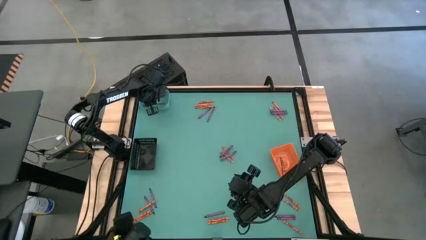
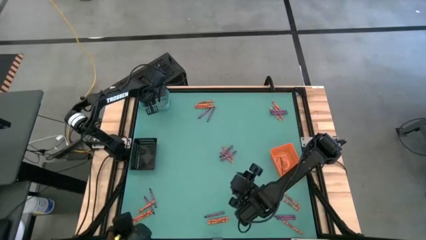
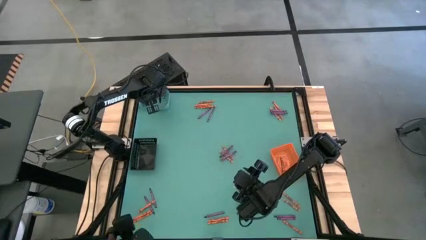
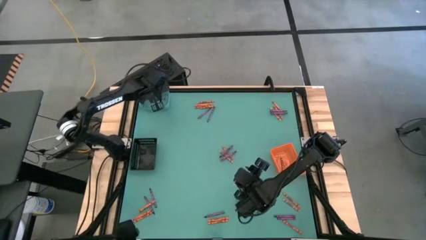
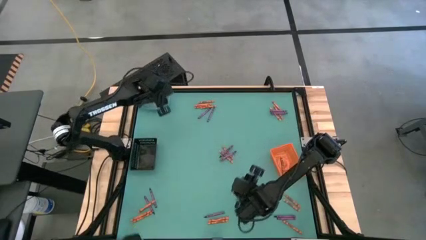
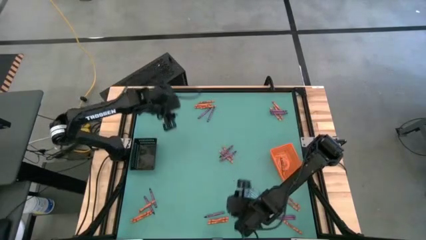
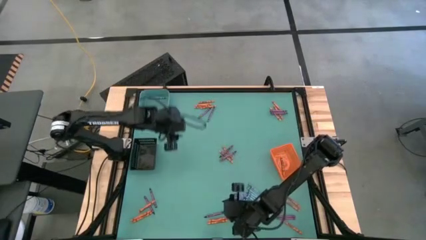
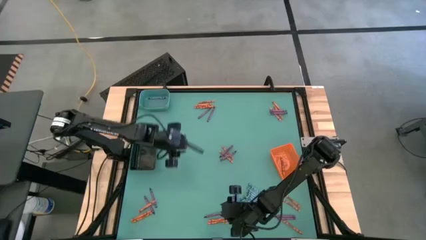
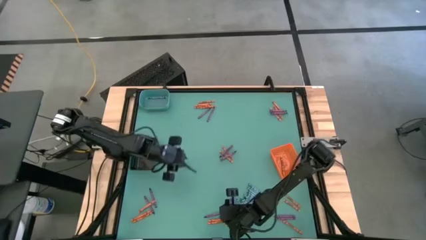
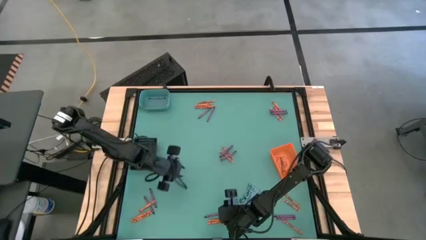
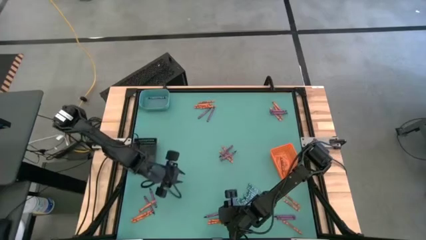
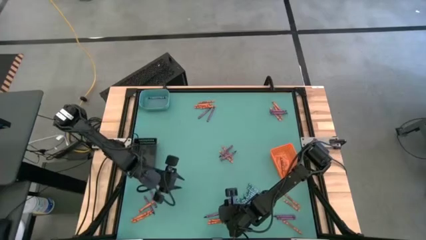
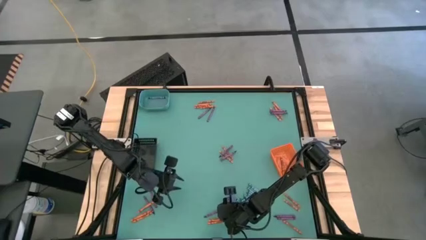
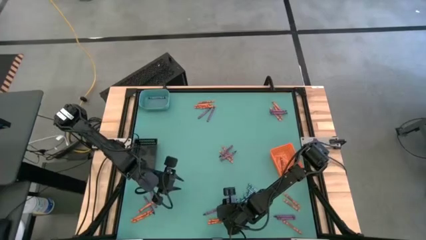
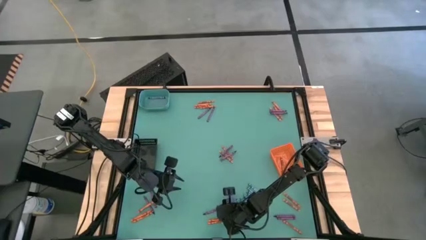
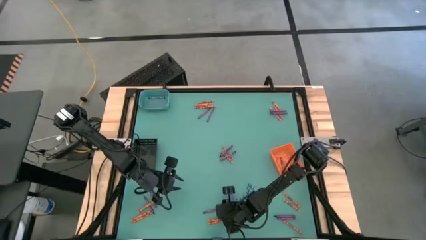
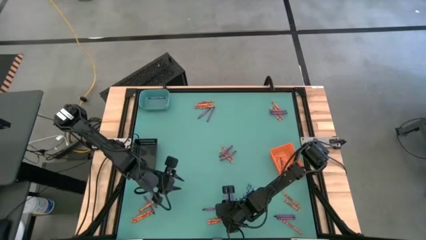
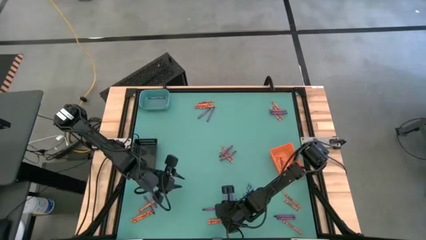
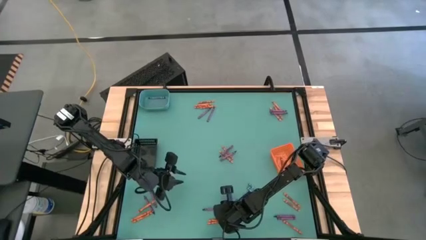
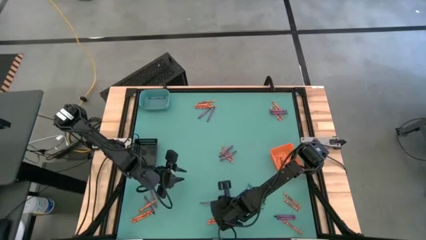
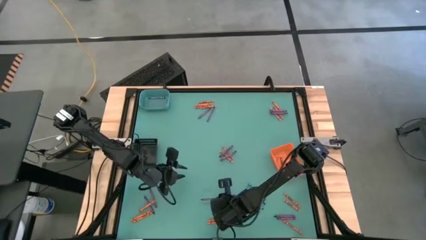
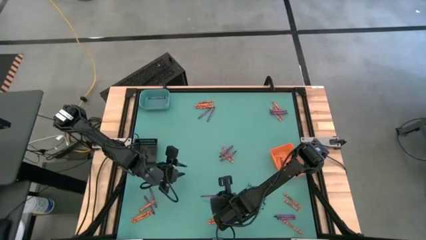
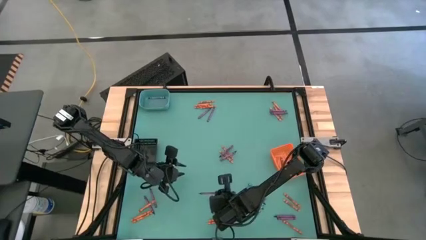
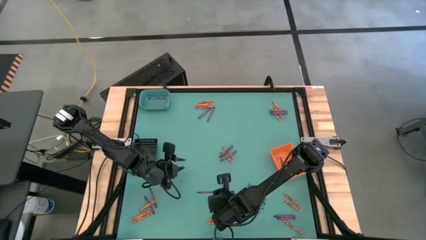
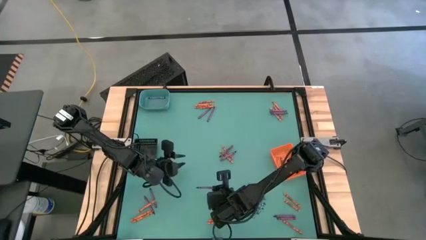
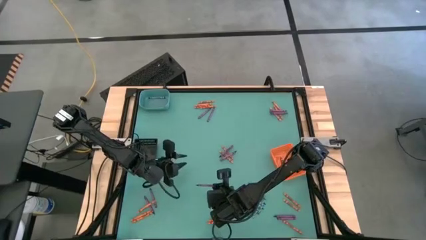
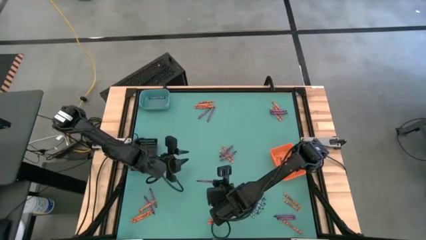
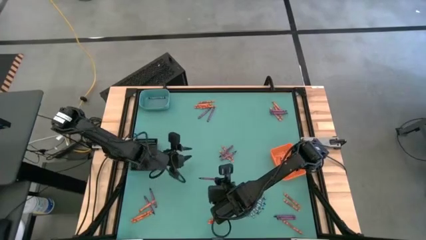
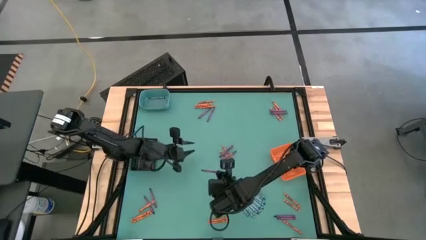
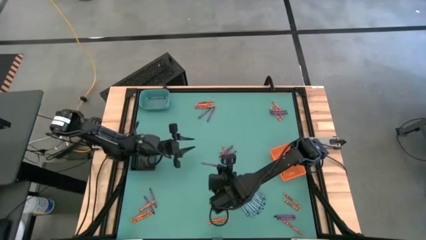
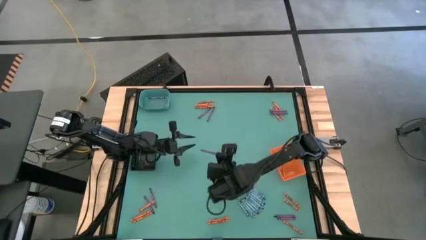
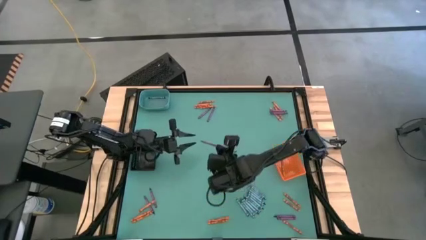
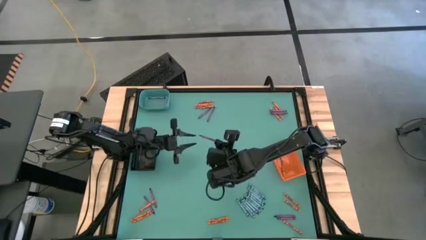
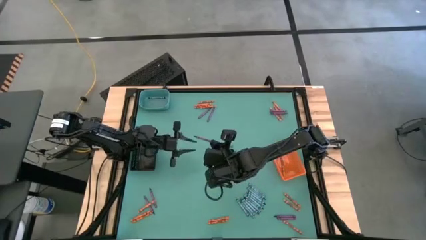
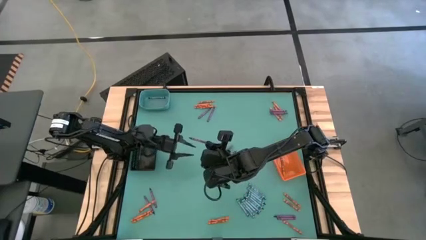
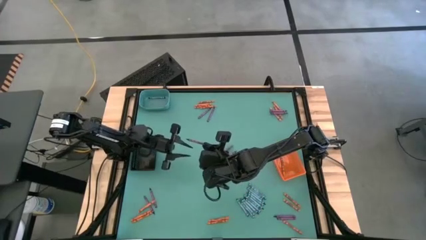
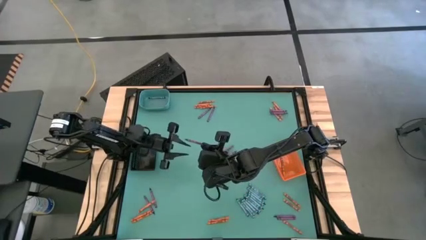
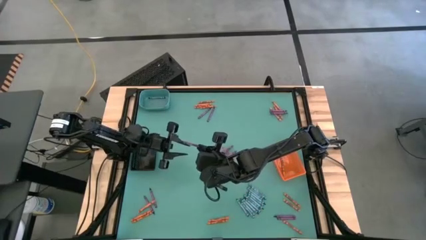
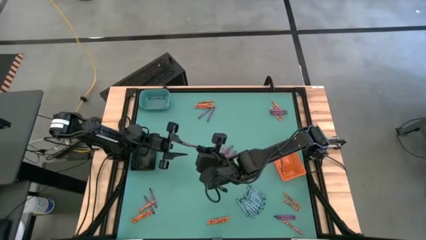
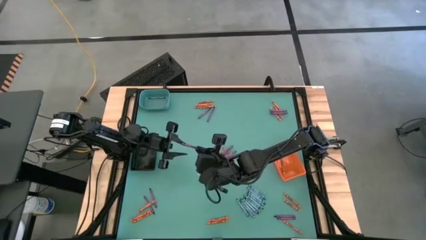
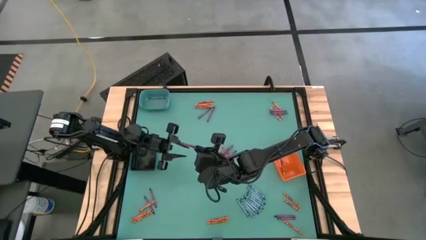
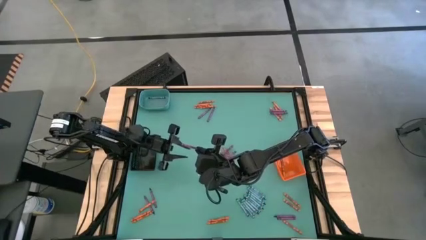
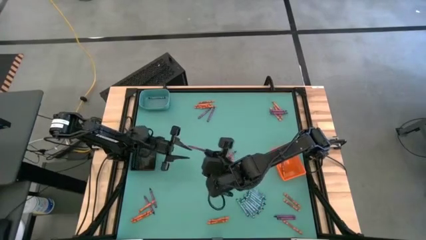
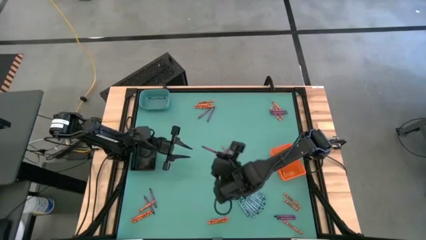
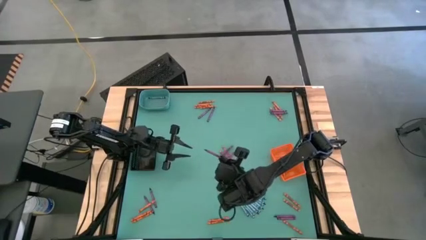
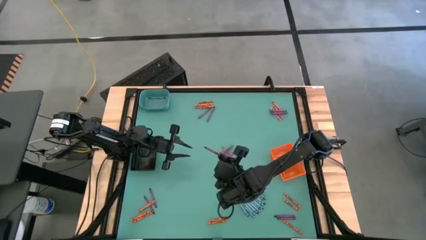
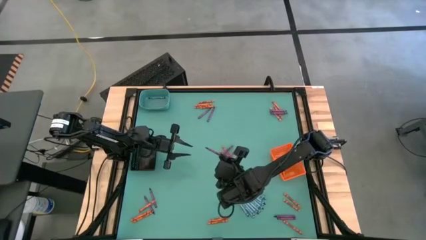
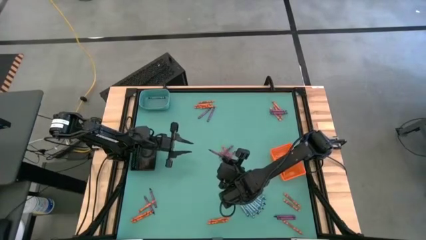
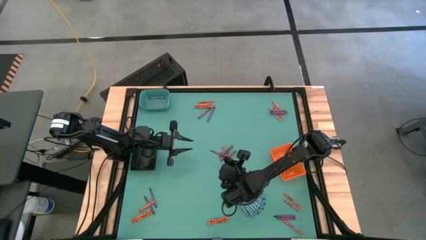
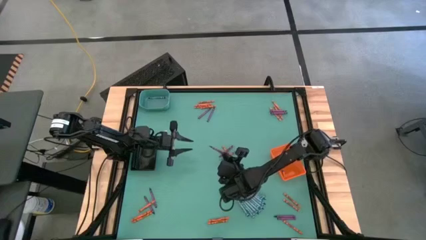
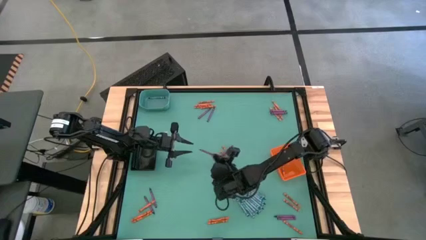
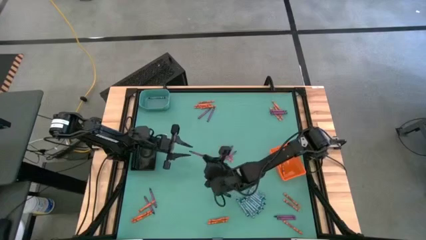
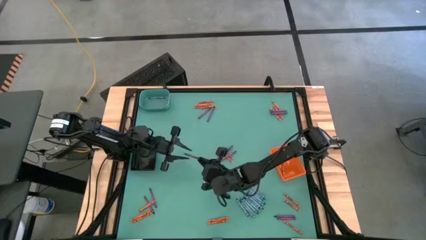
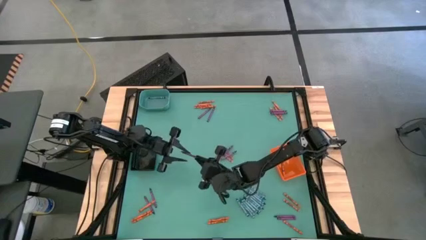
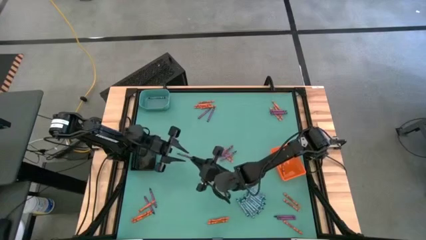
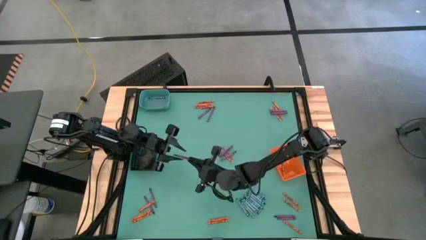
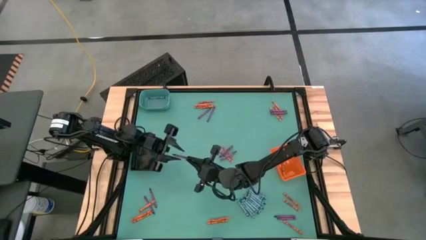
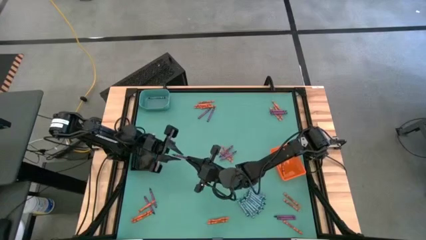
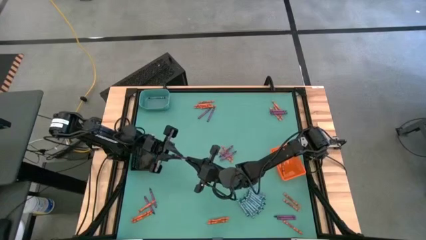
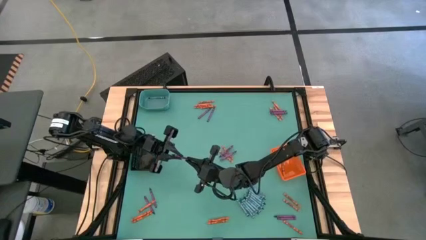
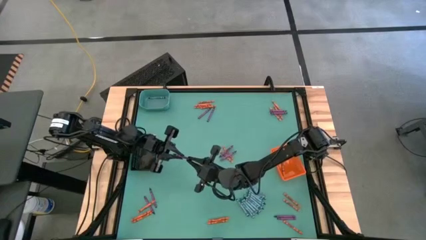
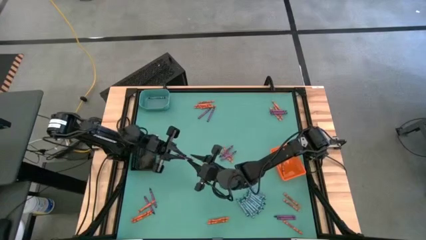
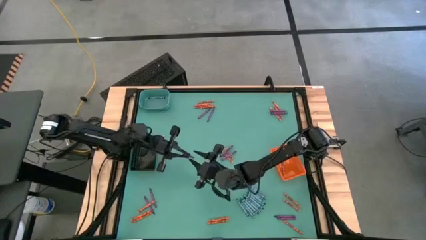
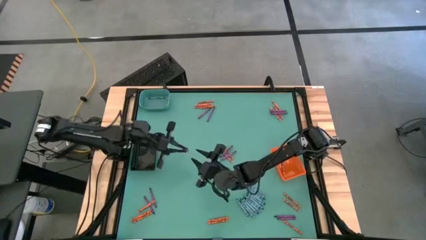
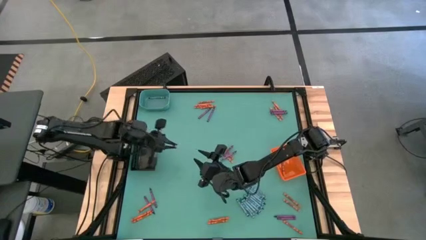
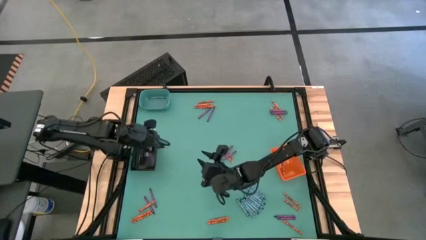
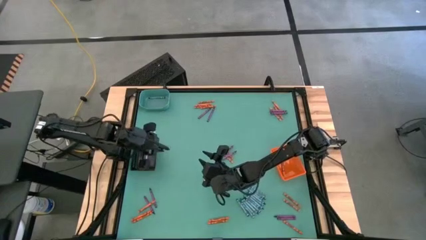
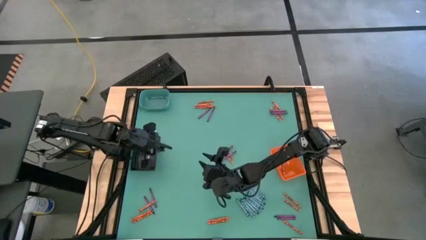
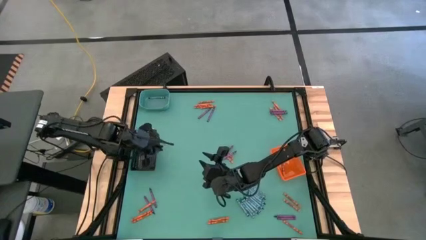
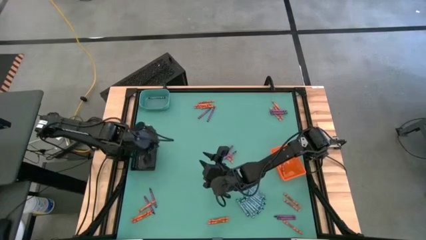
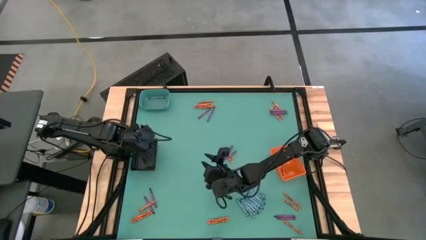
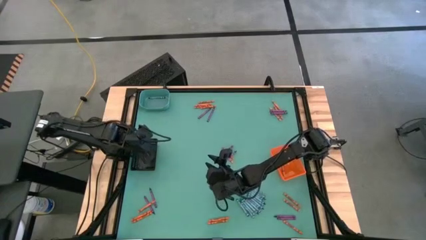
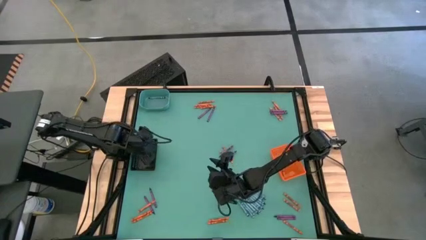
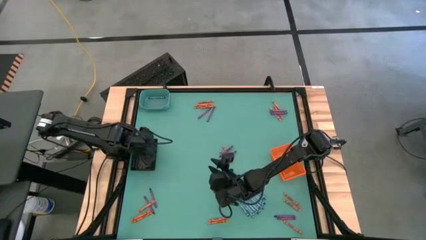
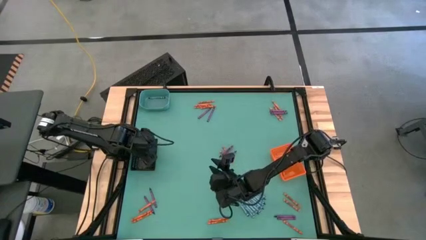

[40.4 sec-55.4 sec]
Task: Sort crayons
Put the purple crayon into the black bin
